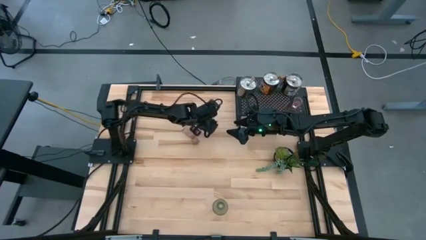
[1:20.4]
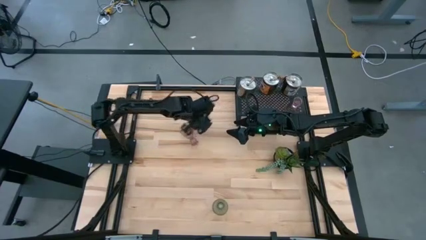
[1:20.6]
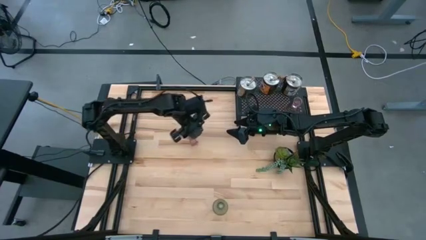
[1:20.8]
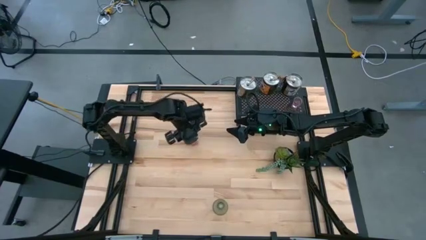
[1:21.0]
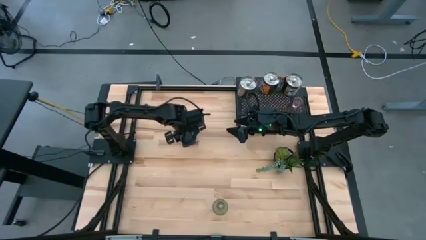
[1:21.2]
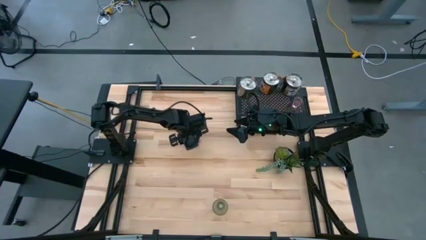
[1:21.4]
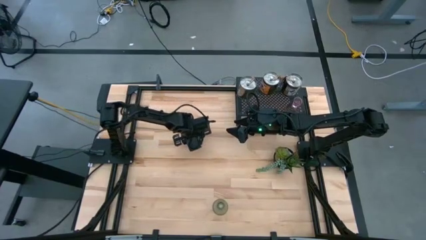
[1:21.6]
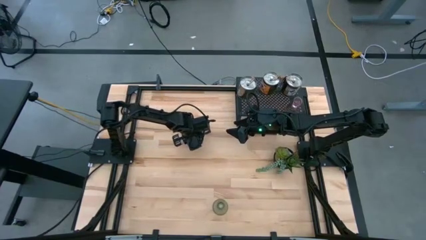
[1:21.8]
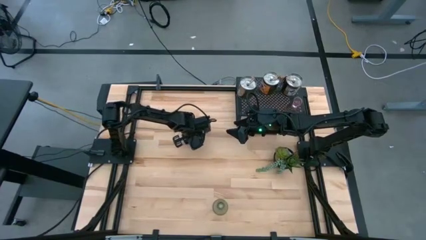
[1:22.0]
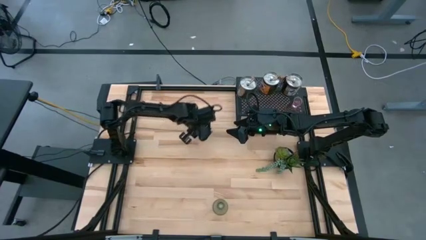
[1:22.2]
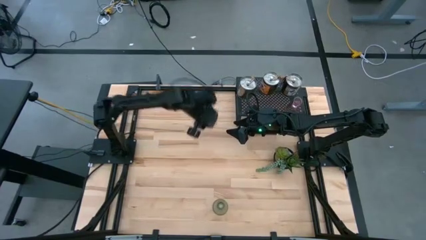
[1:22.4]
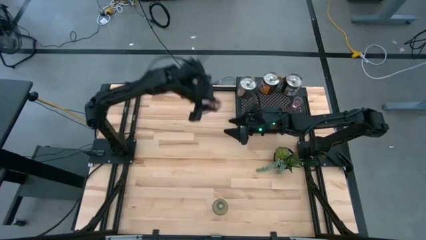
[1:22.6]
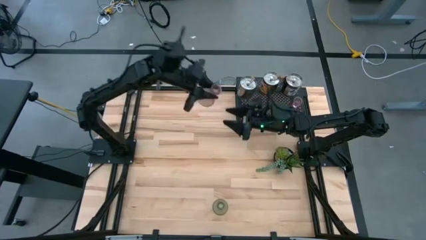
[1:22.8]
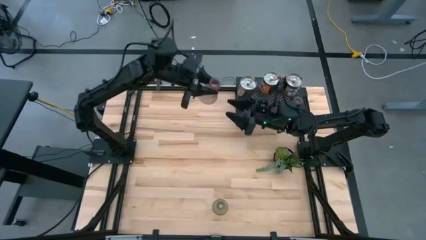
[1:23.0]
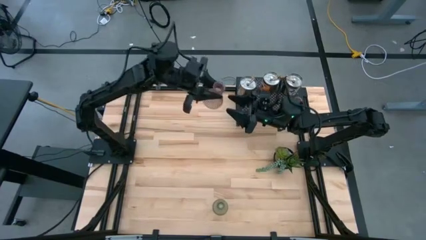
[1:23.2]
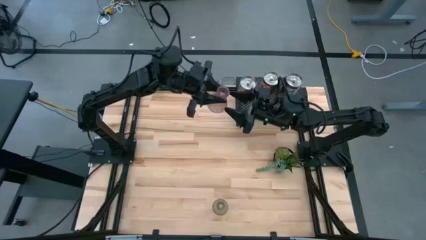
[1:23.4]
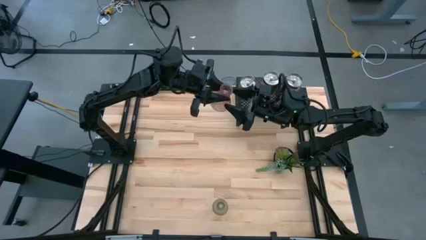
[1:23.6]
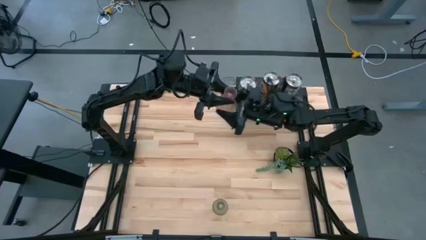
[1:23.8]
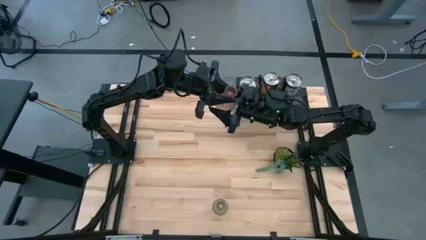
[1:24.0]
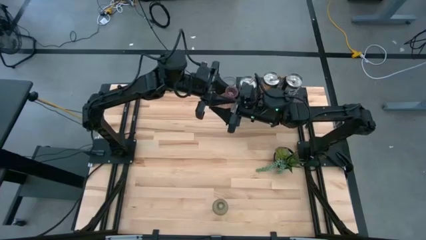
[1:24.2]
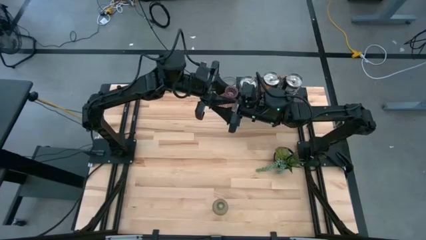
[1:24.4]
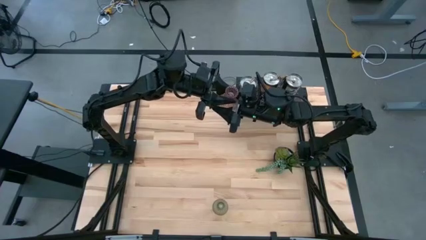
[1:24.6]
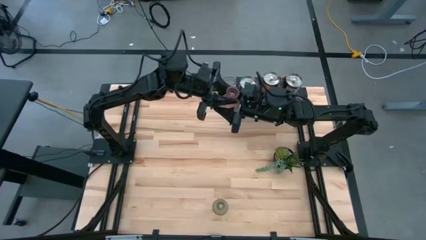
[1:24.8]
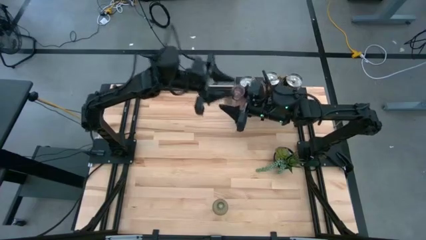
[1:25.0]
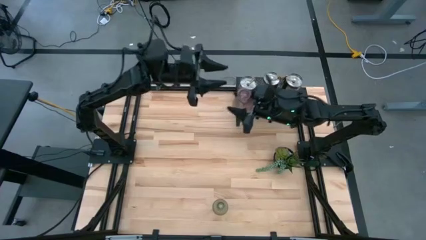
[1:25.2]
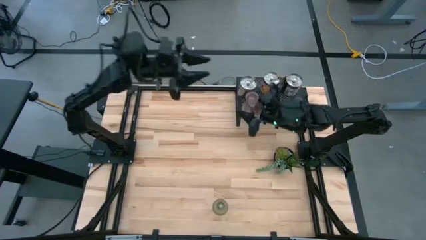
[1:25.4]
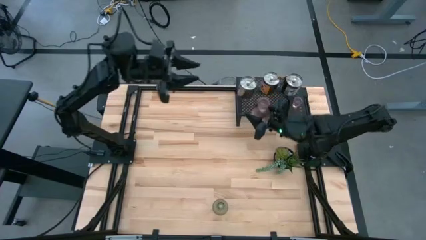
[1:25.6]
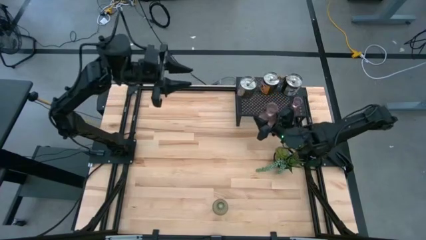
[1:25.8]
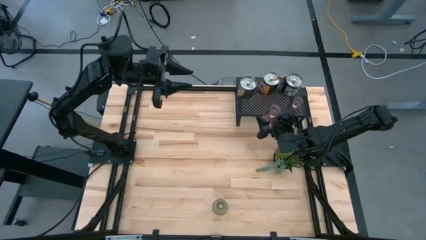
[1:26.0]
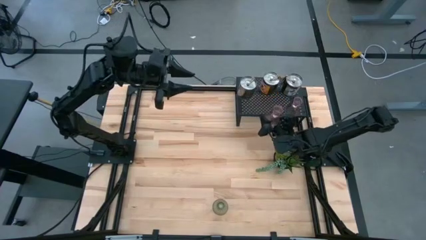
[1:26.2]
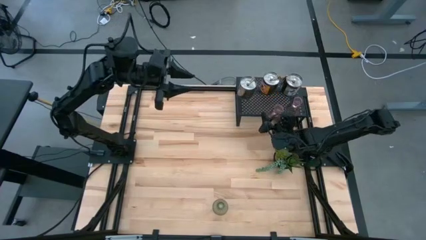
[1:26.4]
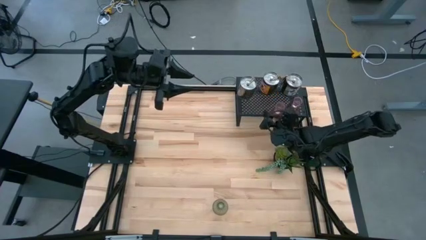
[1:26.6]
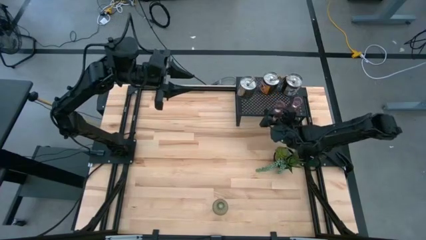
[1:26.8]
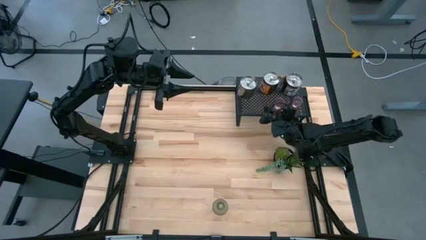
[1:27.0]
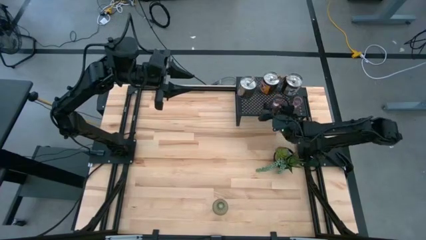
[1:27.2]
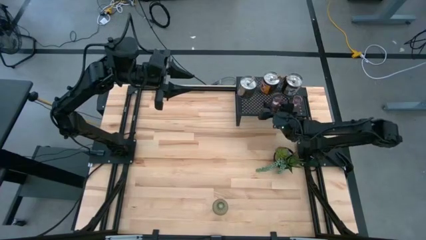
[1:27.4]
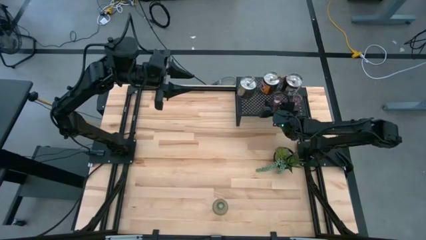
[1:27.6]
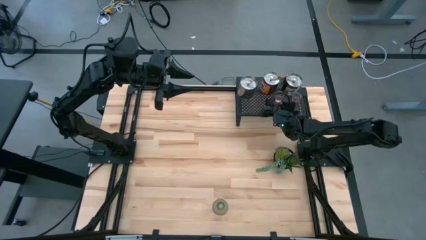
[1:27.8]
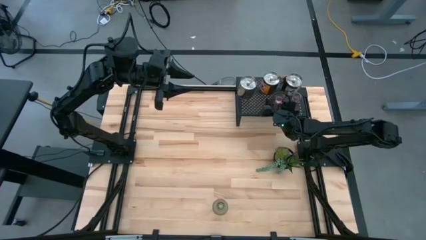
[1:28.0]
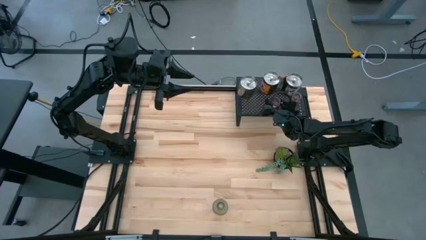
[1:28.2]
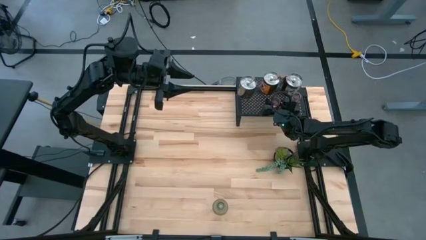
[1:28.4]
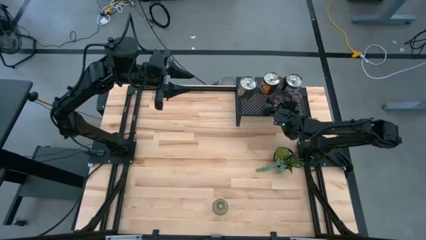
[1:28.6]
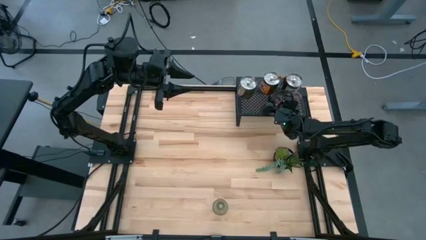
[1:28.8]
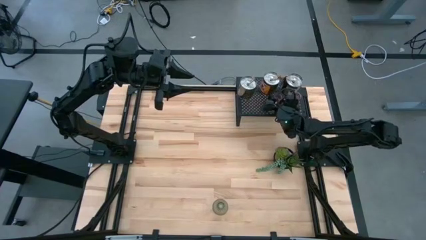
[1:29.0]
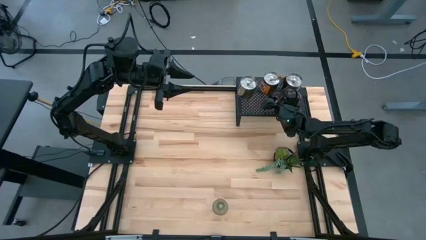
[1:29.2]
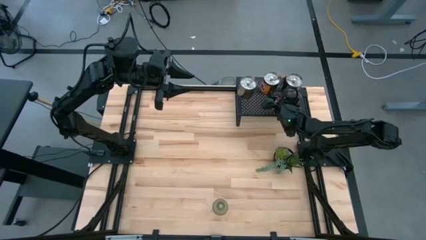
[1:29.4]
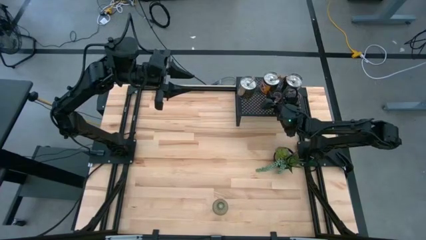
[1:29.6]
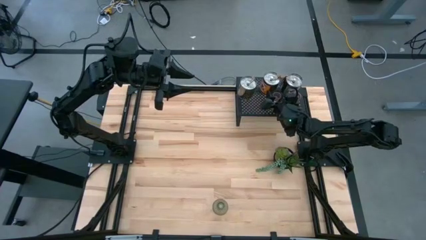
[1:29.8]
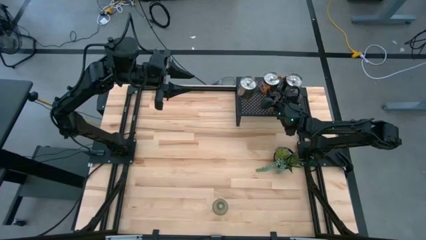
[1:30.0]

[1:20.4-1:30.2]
Task: Pick & Place candle stick holders
Put the pink candle holder on the shelf aligned with the pink candle holder

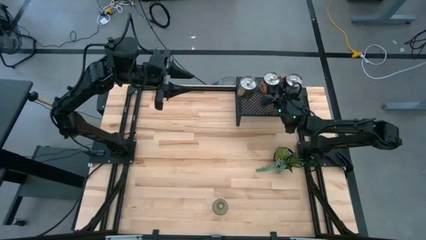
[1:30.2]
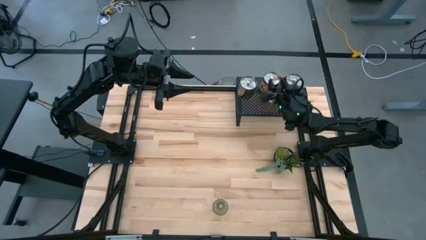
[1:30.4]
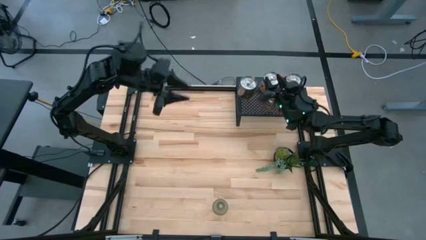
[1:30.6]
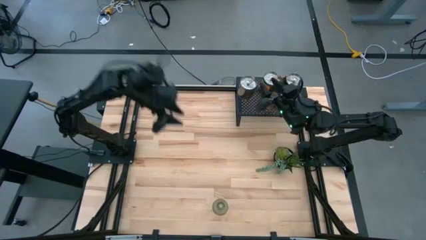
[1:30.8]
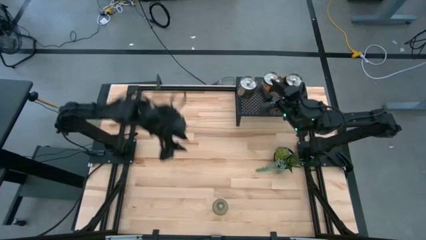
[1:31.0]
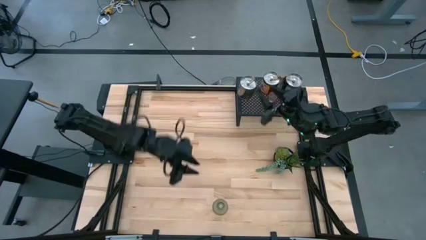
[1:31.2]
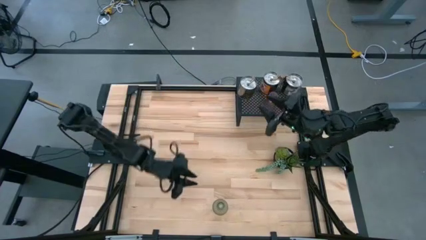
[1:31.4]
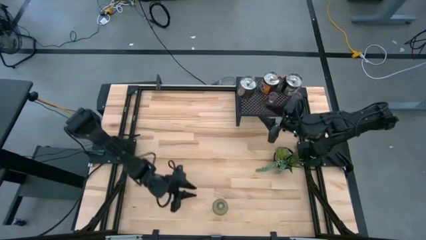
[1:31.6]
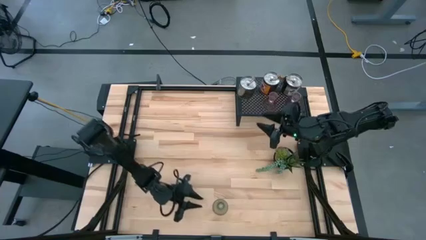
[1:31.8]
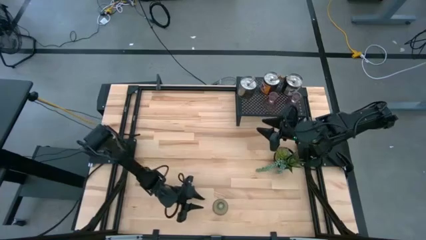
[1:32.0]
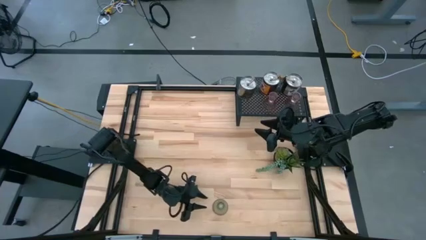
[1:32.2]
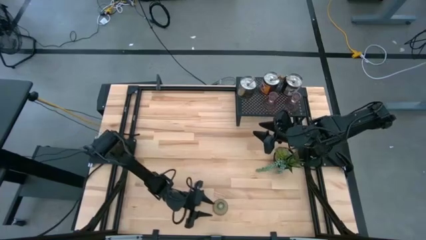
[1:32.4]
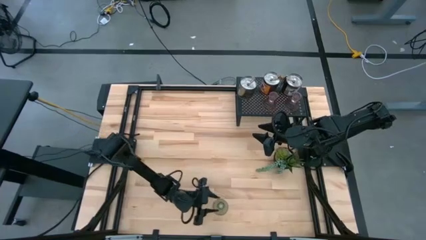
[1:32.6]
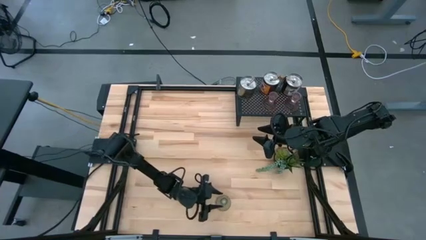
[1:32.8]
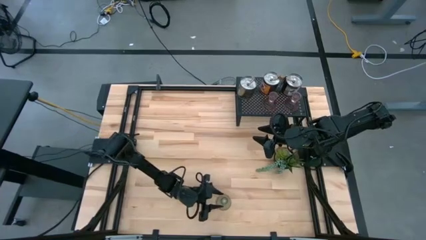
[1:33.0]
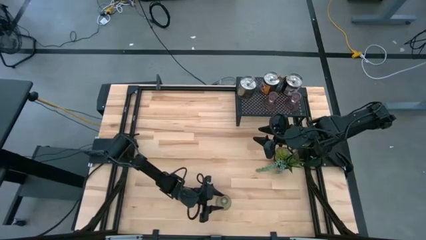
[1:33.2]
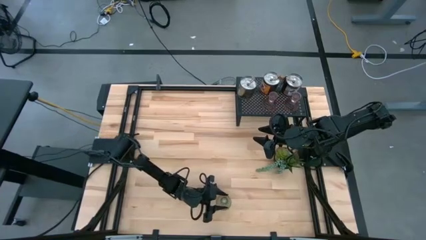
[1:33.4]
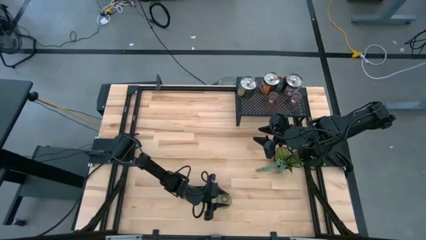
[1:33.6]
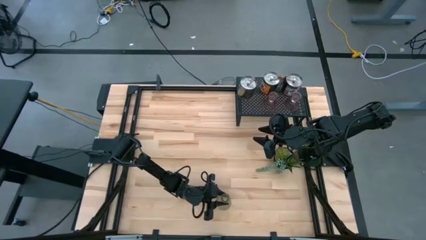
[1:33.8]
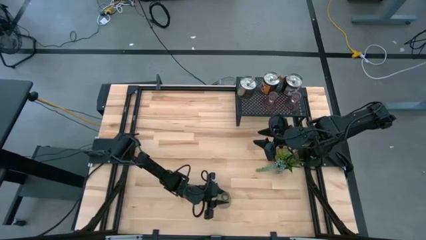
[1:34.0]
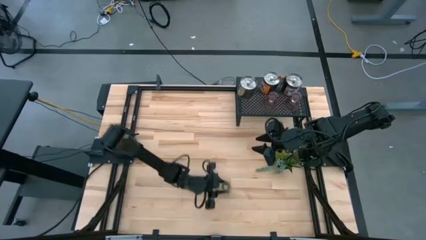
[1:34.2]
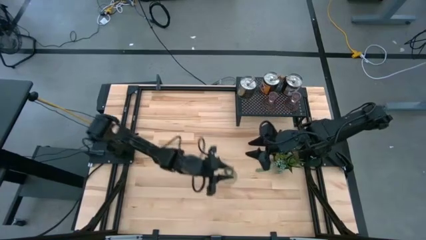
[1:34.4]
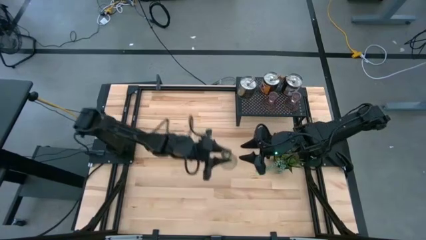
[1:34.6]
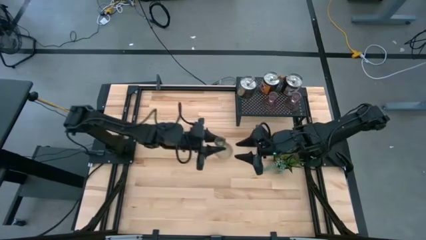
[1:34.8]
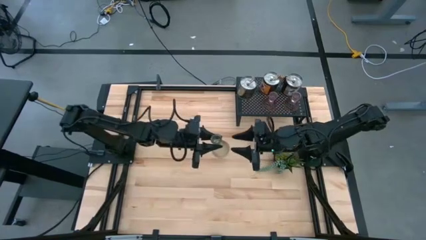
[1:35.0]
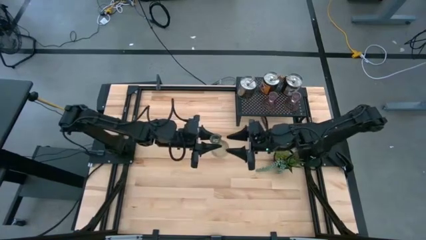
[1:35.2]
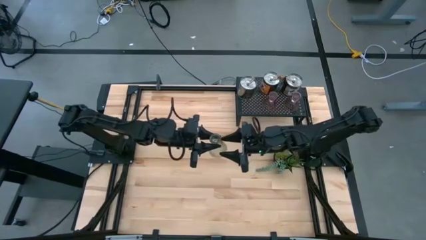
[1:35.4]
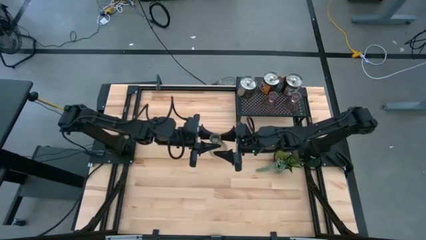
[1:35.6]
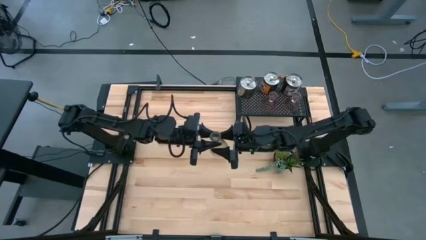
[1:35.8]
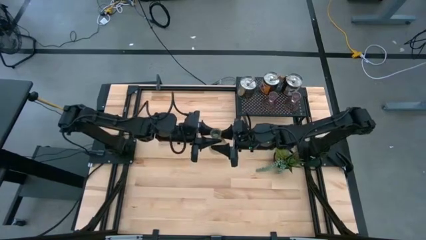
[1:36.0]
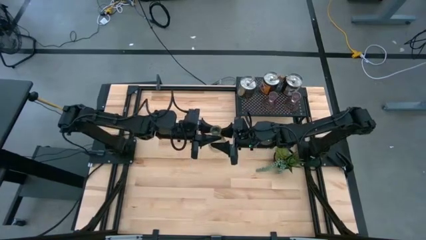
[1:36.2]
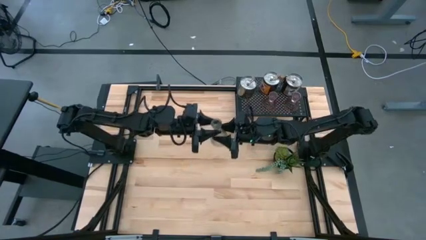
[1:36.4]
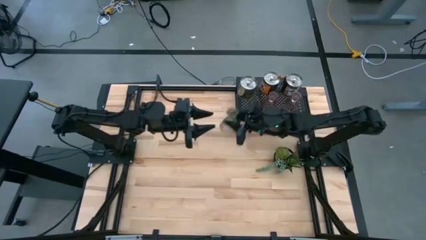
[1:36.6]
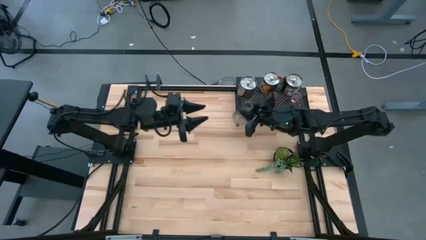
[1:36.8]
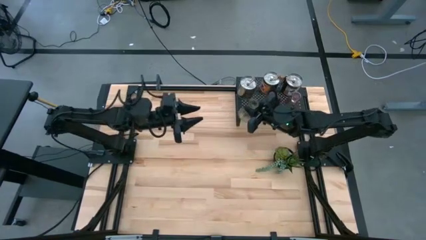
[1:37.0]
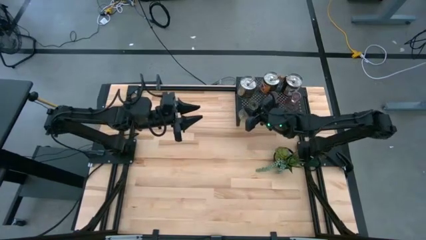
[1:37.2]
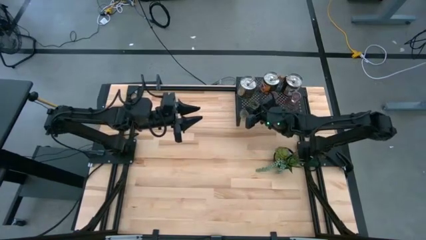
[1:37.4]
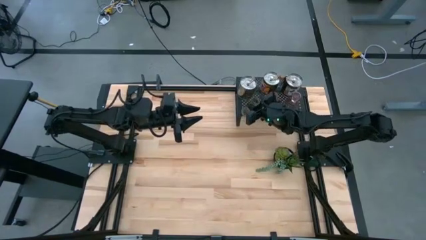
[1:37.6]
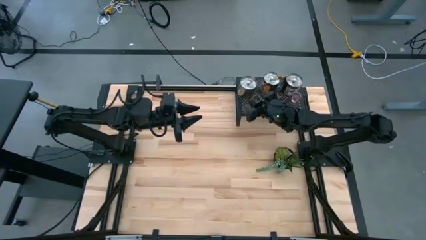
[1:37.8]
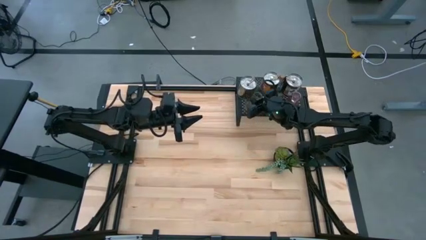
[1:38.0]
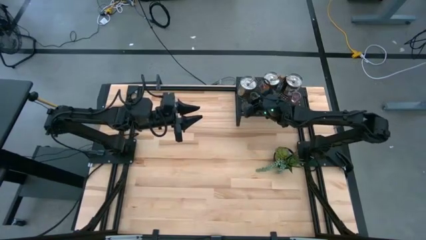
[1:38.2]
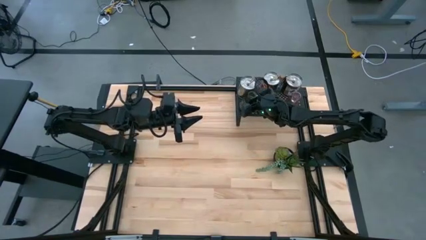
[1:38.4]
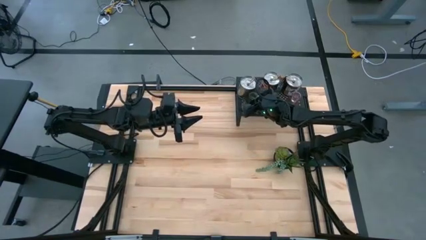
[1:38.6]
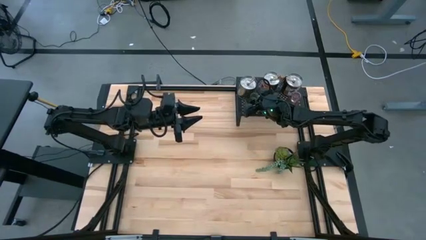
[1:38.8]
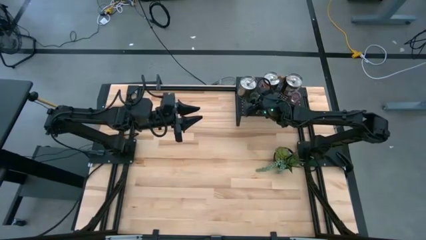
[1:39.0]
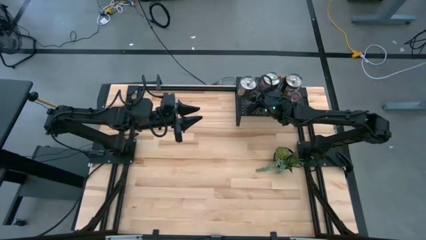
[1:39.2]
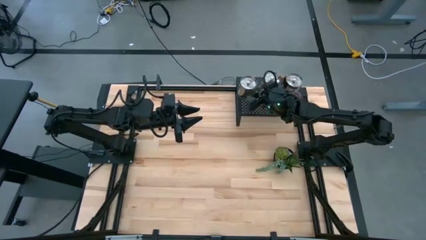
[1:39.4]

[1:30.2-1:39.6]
Put the green candle holder on the shelf aligned with the pink candle holders
